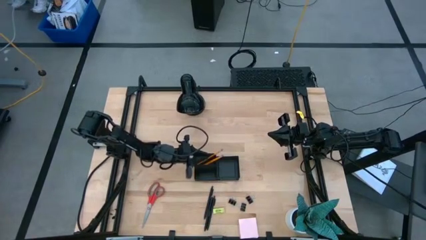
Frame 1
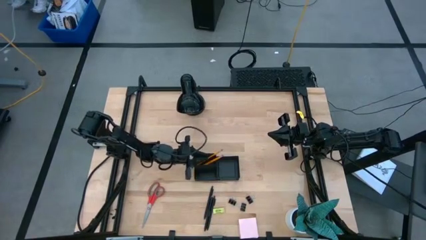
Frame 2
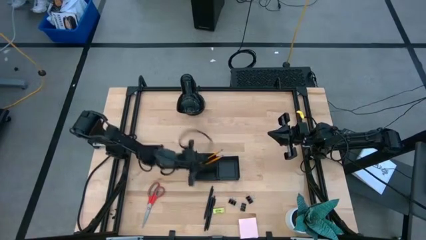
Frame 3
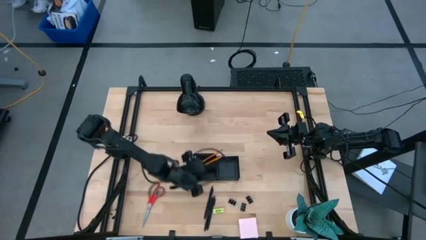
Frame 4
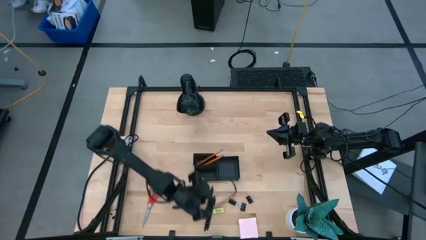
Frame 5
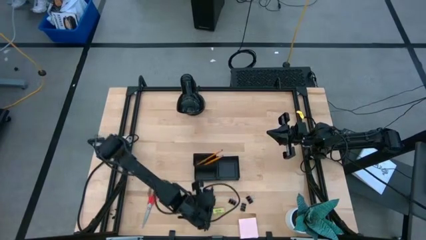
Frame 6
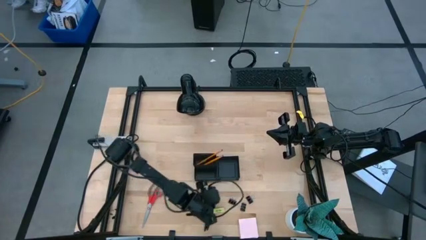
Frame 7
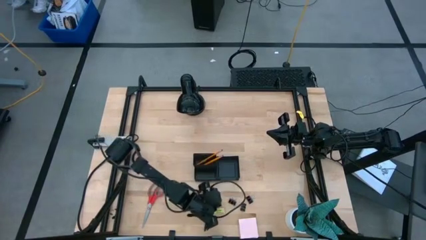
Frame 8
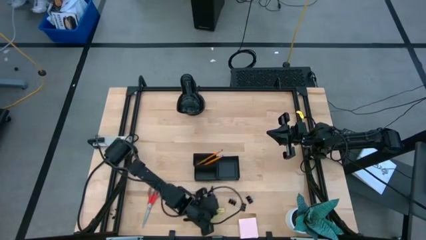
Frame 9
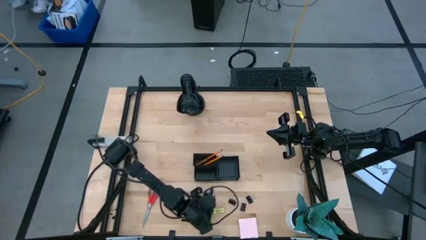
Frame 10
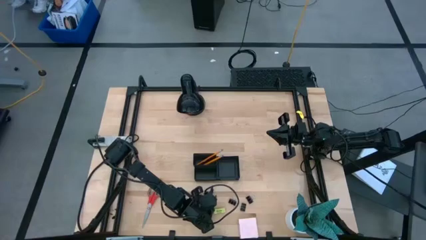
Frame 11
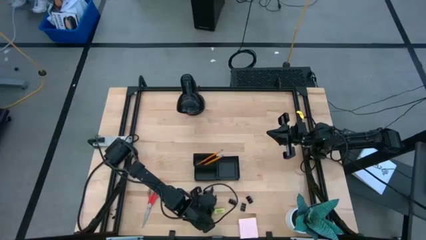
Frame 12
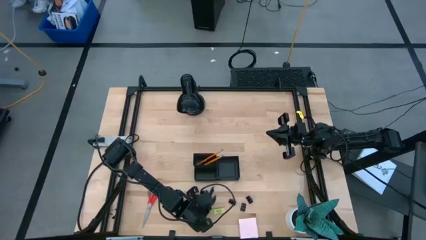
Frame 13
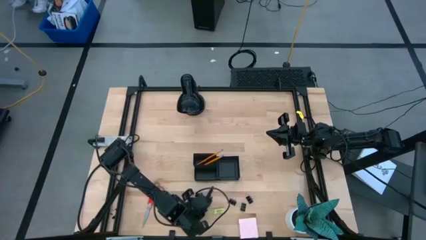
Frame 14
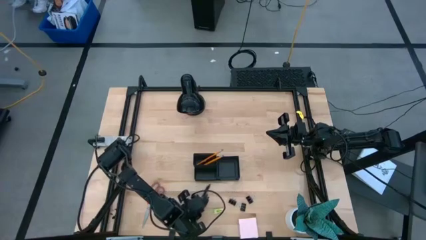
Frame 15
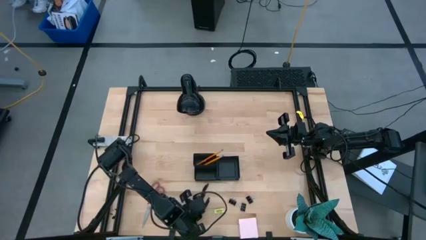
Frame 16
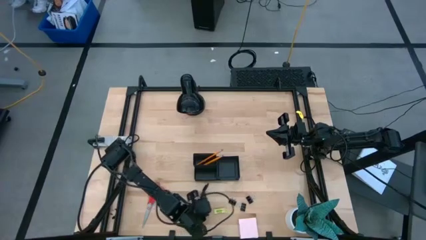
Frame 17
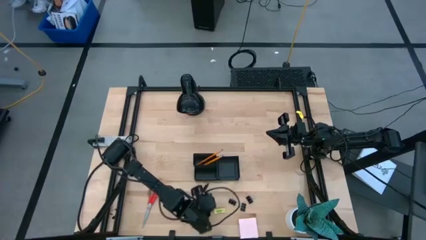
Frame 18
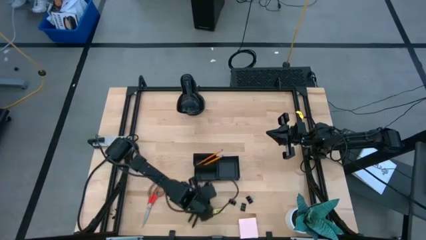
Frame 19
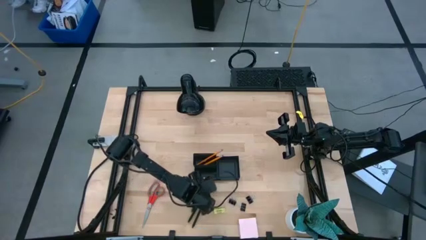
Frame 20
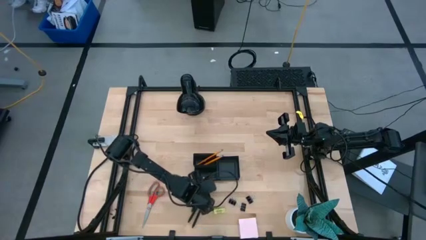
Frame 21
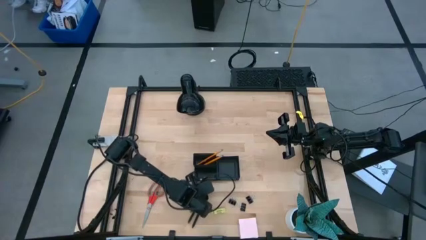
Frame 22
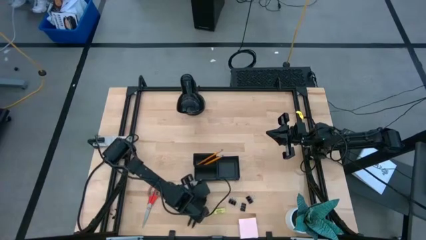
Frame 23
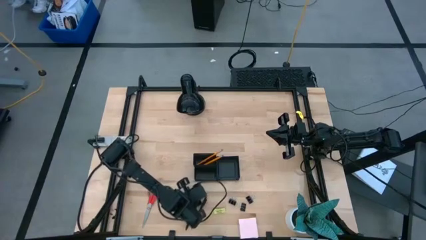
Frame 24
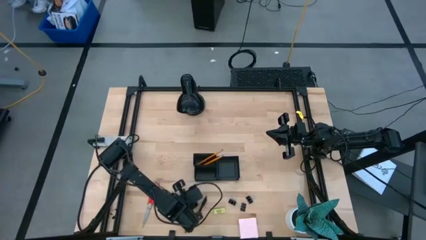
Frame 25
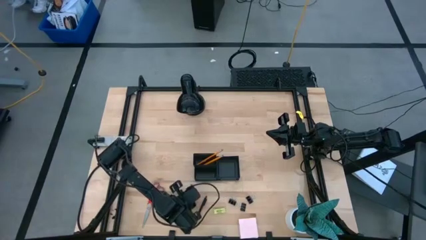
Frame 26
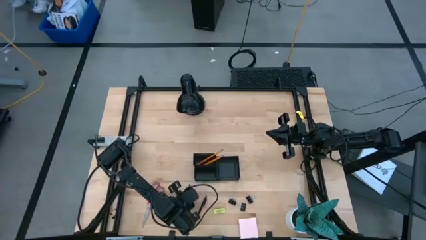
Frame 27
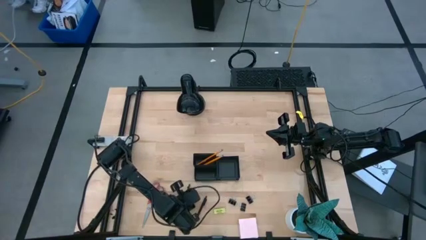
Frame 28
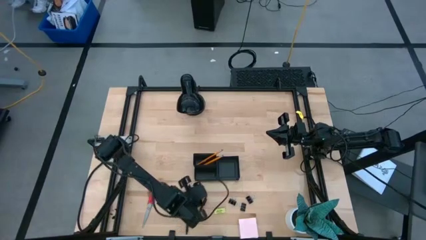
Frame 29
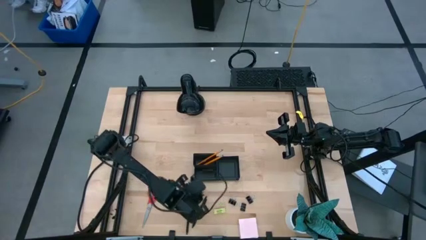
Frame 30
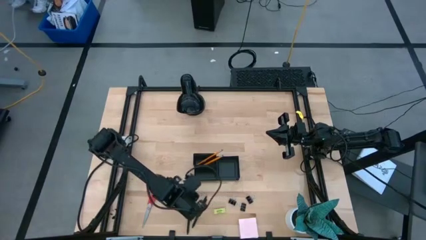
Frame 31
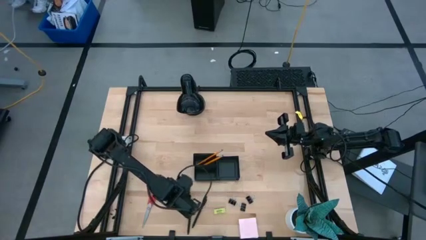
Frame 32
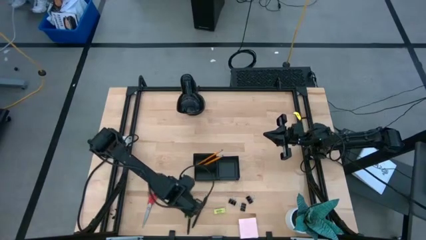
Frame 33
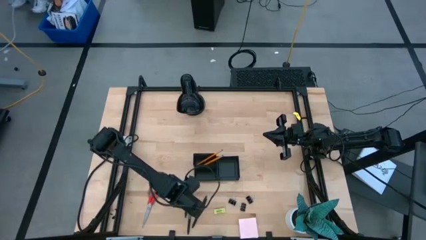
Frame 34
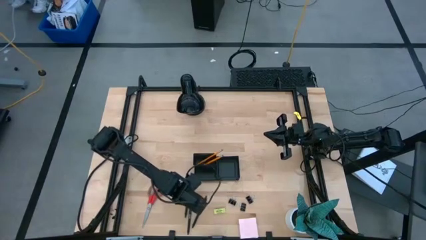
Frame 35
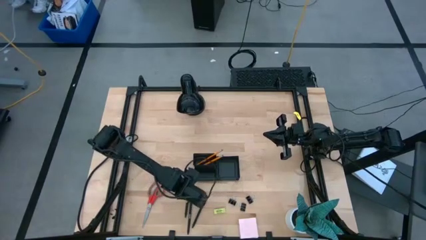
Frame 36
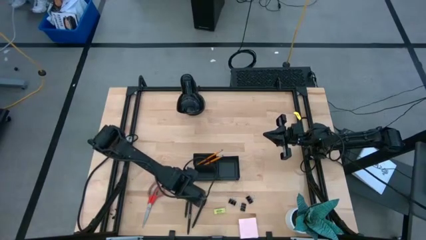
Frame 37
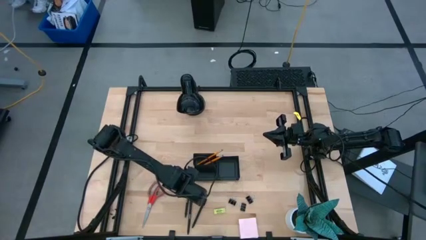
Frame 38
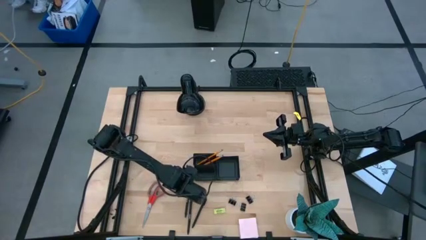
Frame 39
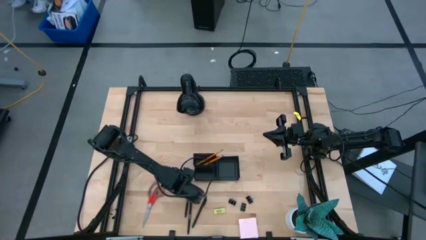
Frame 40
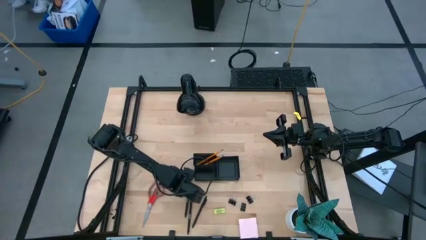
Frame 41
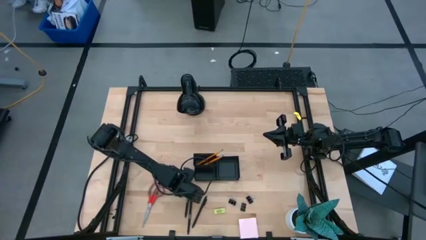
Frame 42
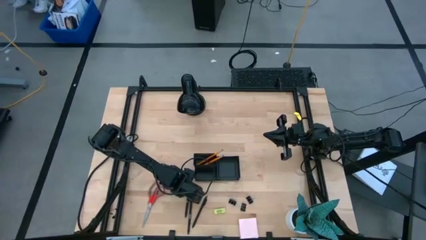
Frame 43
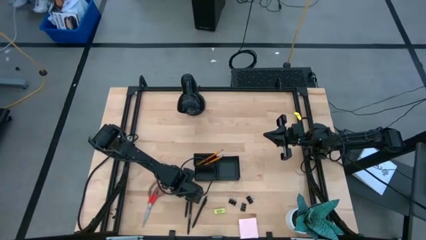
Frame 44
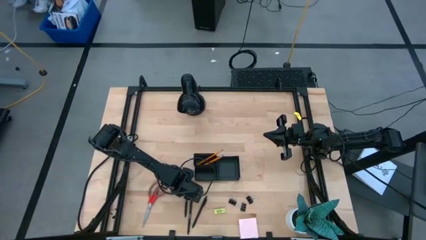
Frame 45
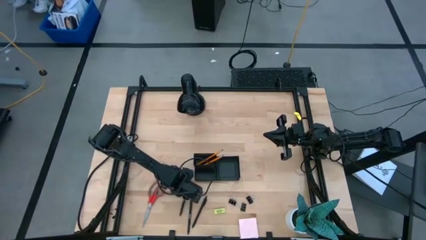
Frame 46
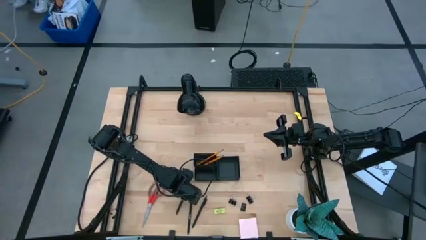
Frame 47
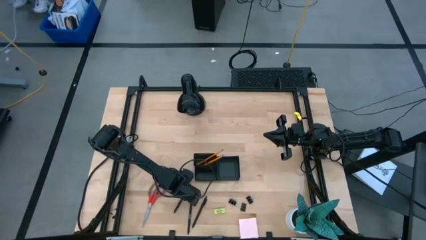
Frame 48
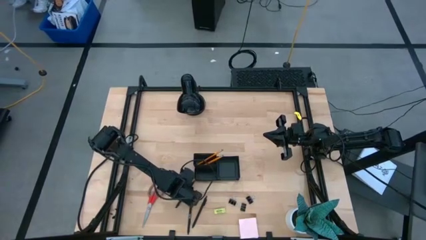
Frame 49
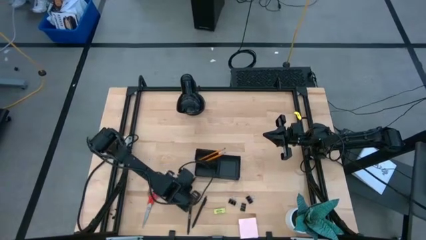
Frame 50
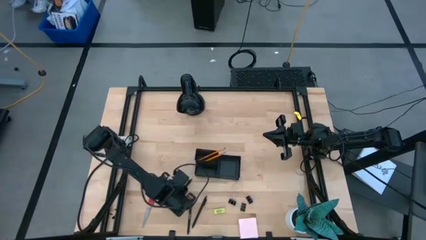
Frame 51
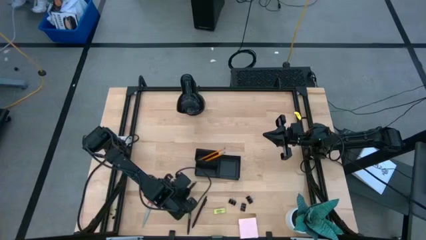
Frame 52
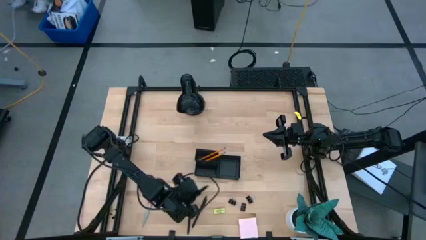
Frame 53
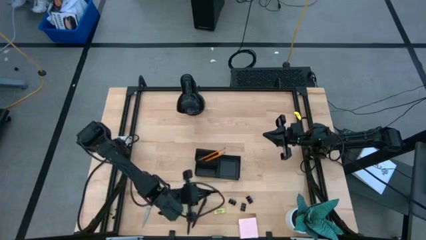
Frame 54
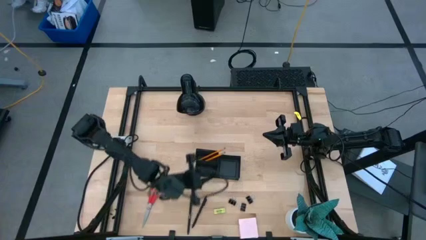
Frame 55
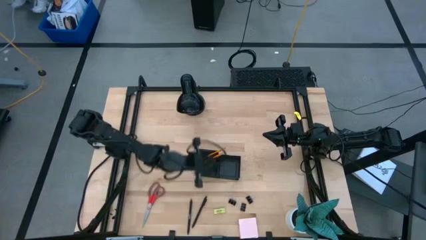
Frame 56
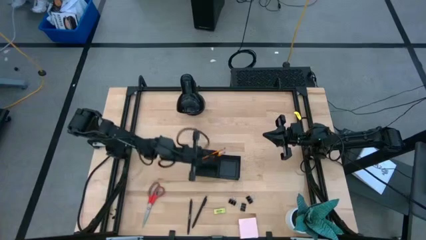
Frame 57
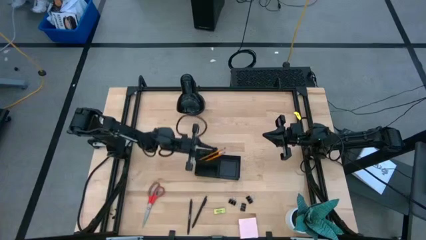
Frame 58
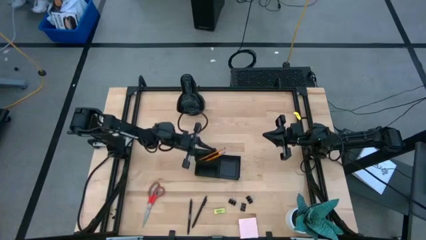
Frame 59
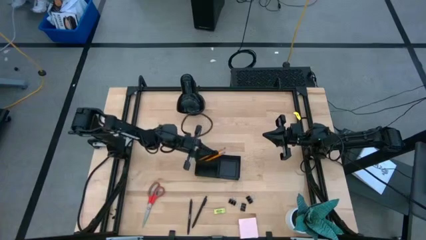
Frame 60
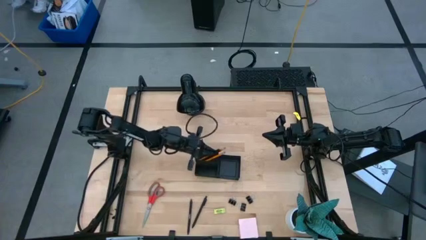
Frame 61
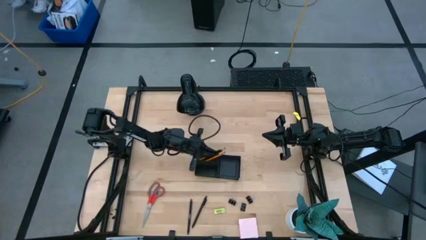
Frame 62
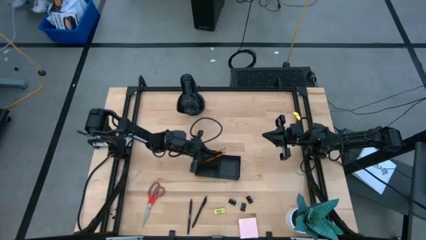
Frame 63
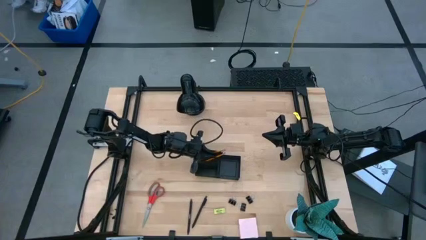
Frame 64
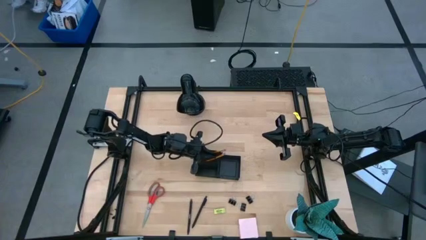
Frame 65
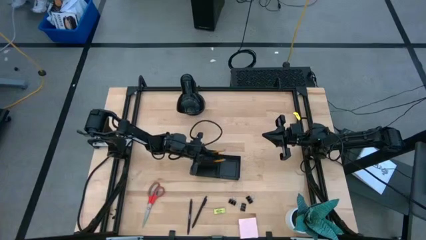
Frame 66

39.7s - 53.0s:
Task: Pick and place office supplies into organizer
Put the black pen into the desk organizer

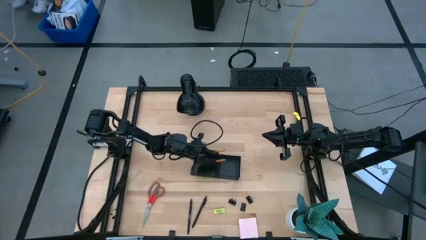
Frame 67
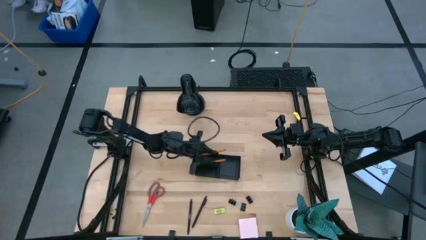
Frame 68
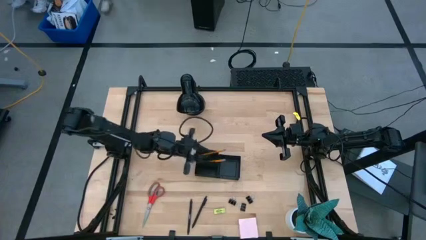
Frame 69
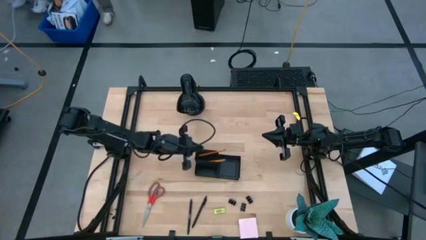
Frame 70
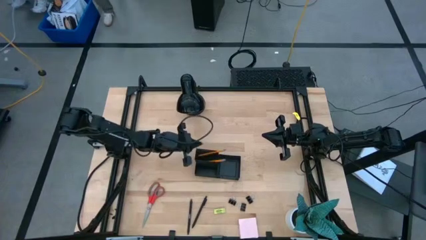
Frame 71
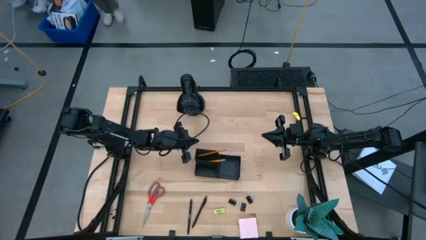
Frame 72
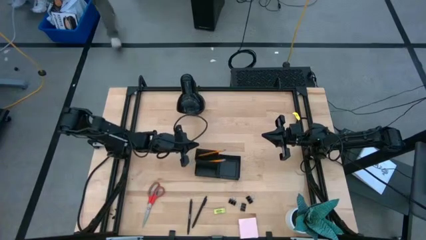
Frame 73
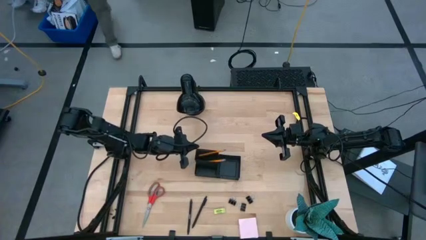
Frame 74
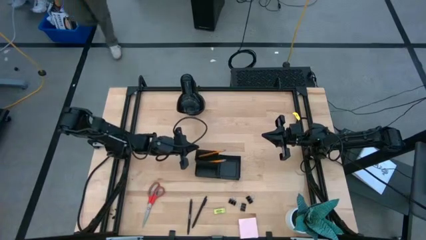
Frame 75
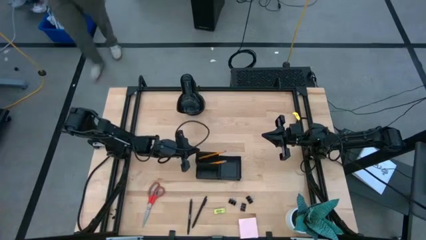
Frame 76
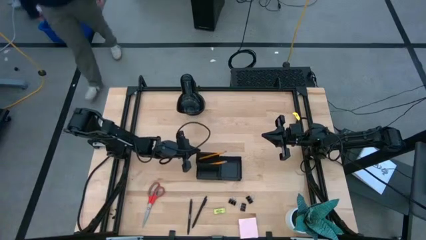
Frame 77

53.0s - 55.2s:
Adjust the desk organizer

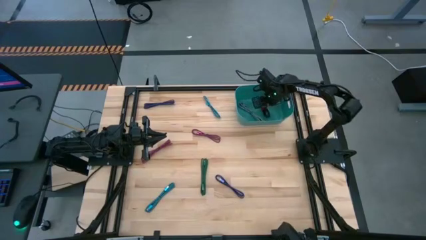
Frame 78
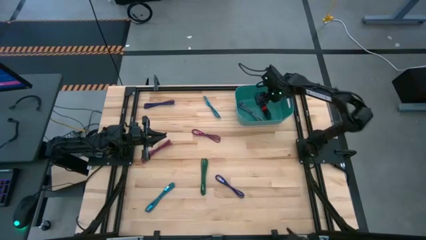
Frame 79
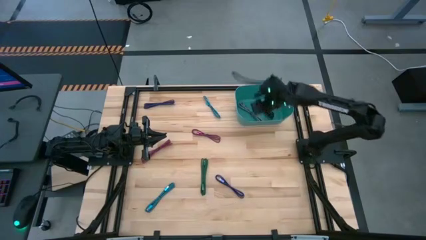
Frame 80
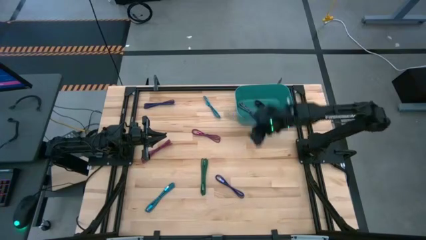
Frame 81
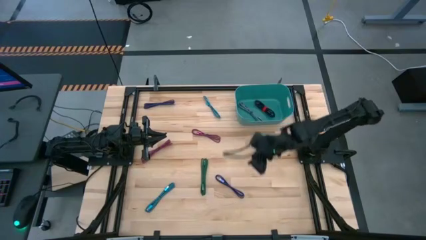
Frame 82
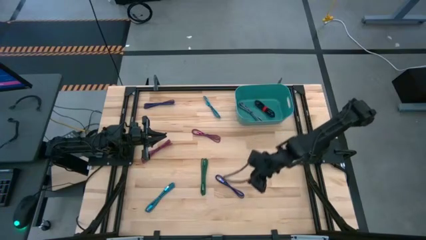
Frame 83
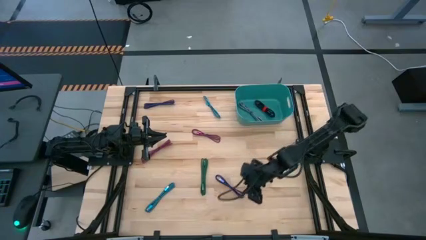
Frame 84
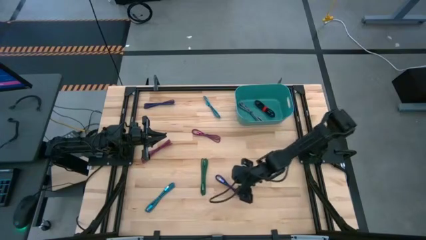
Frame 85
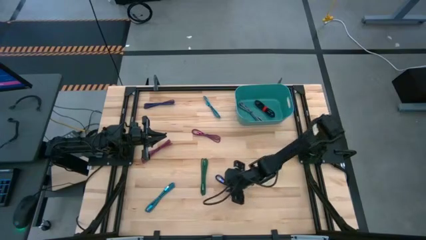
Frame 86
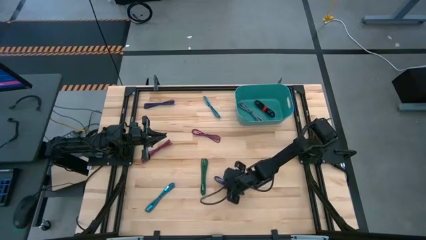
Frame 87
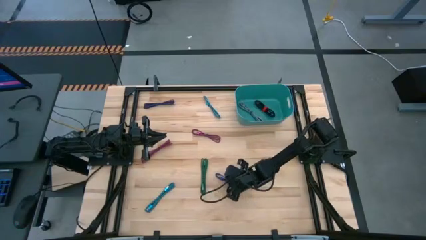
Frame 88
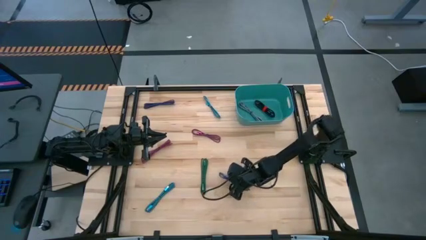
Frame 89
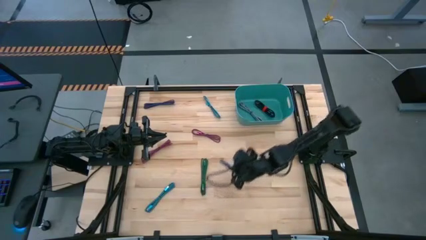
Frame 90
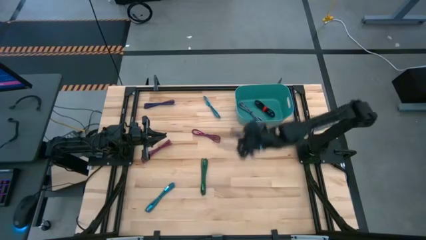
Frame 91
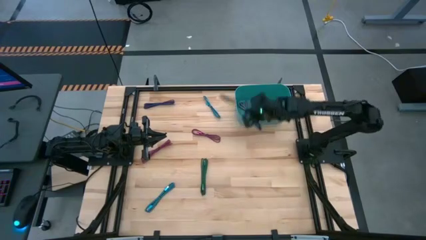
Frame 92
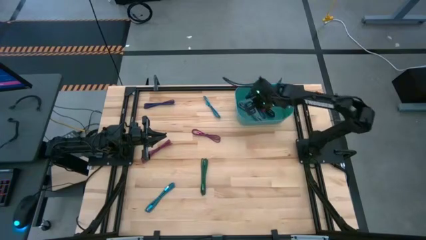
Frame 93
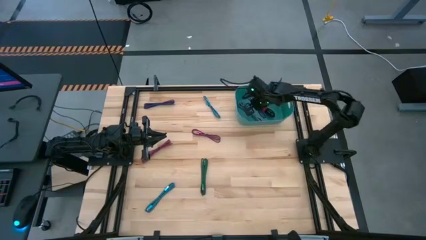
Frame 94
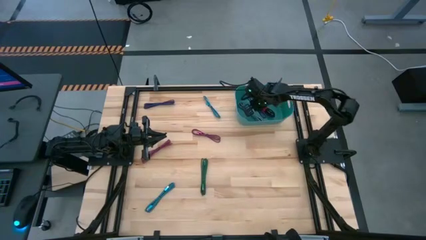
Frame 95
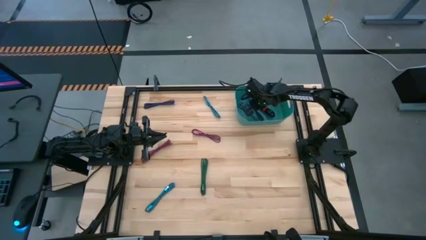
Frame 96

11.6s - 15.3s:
Task: Pick and place USB-C Cables
Put the bottom purple charger cable into the light blue bin
